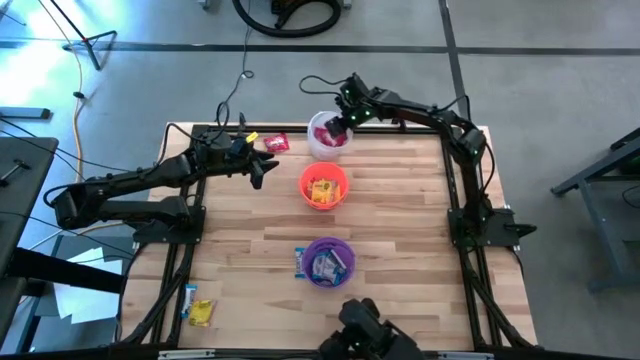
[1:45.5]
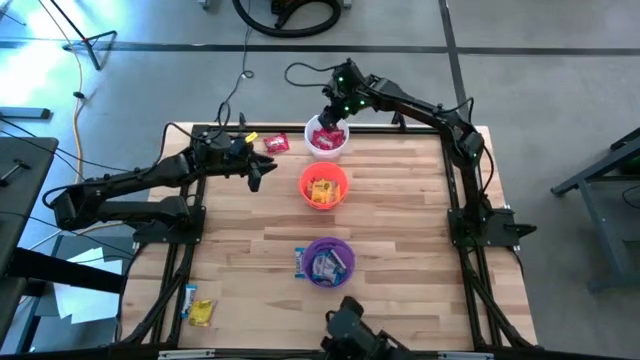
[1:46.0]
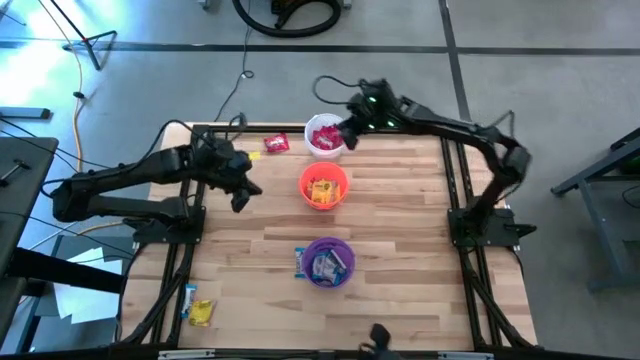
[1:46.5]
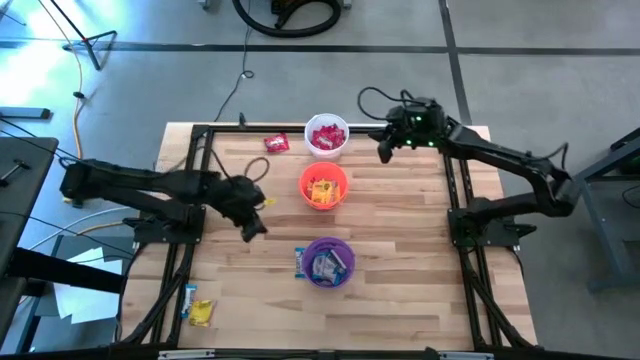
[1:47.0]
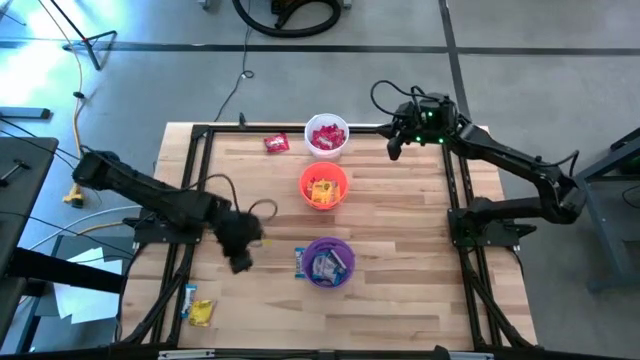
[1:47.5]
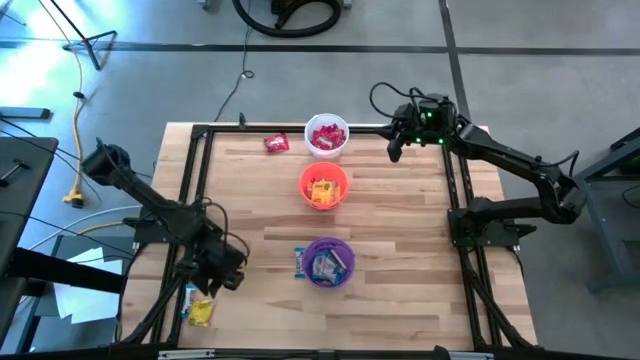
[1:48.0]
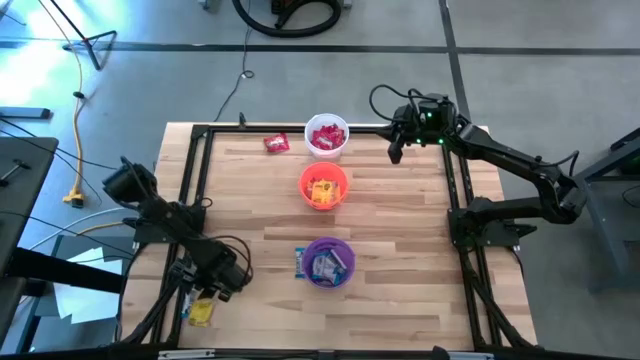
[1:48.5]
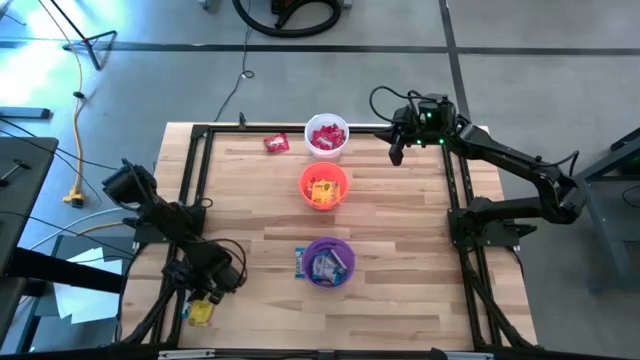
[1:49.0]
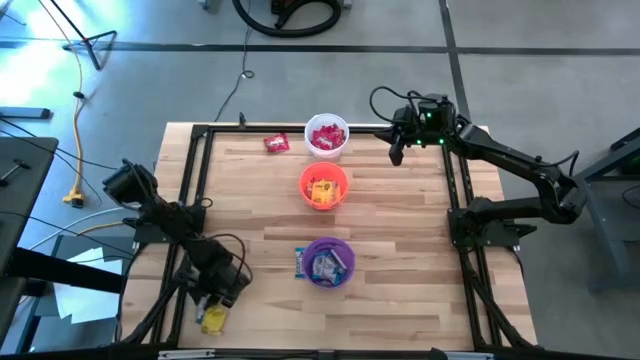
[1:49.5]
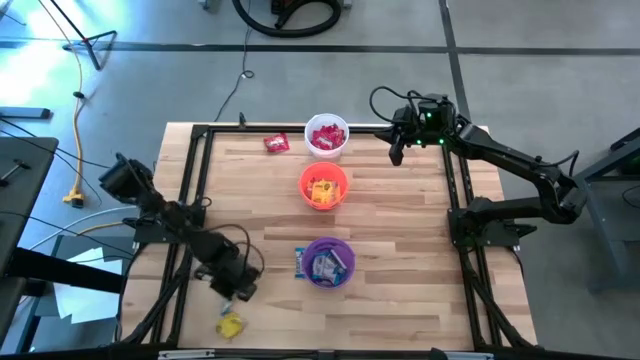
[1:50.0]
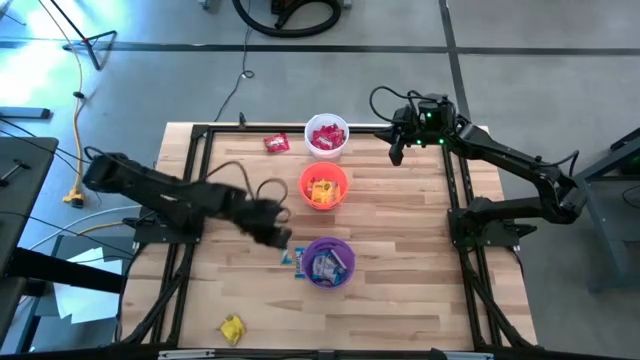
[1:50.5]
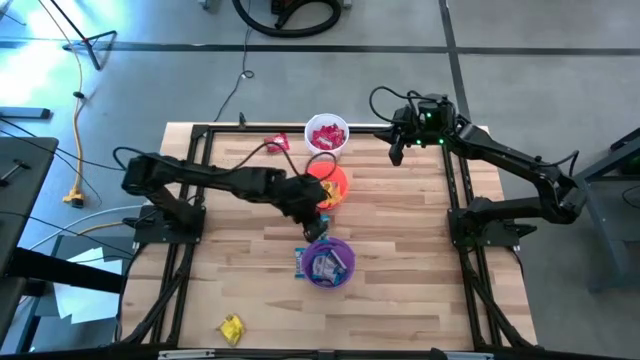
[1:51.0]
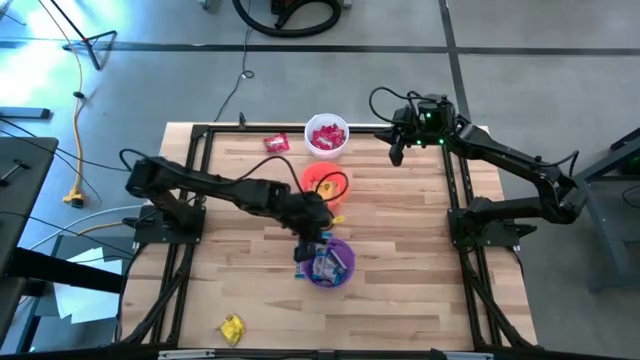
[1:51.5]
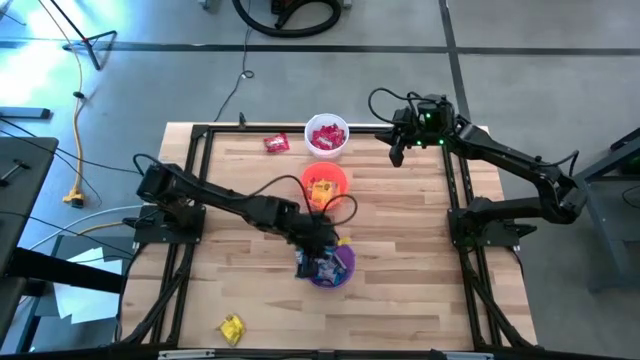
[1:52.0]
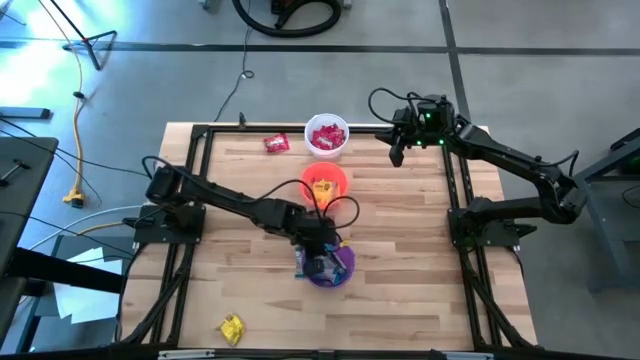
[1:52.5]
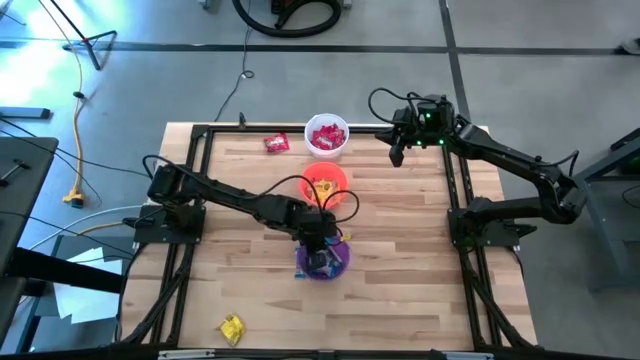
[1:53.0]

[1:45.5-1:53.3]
Task: Sort candy
Put the white chocolate into the violet bucket

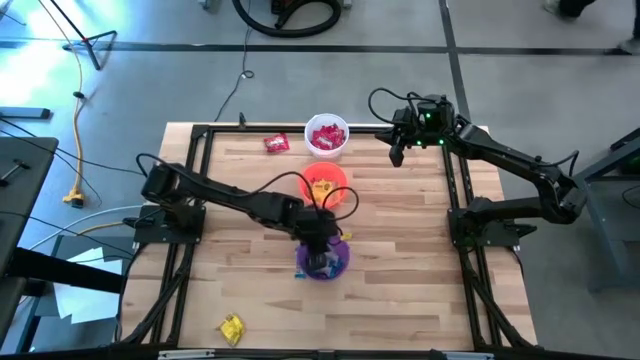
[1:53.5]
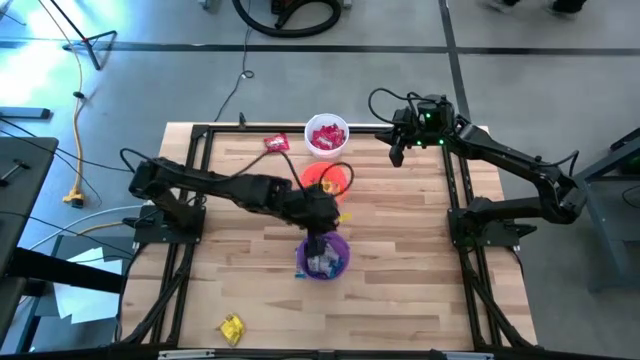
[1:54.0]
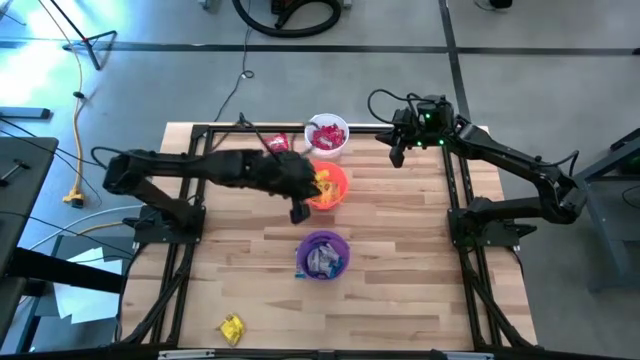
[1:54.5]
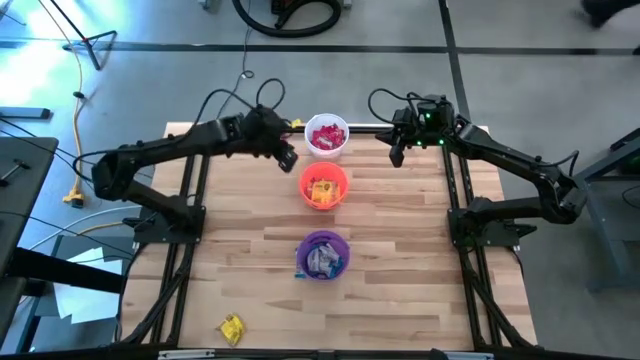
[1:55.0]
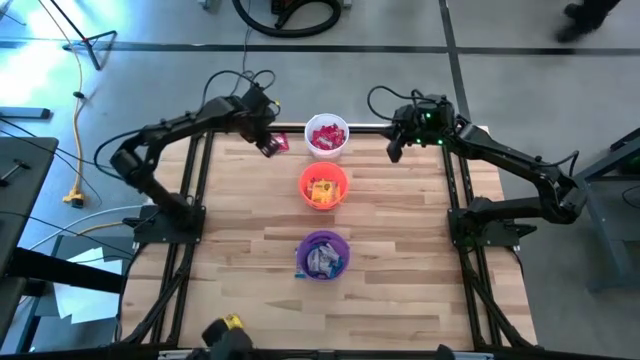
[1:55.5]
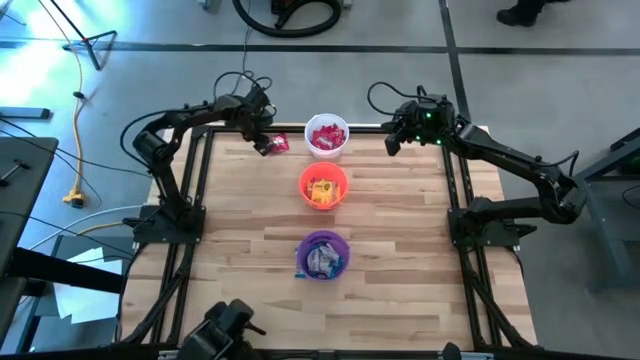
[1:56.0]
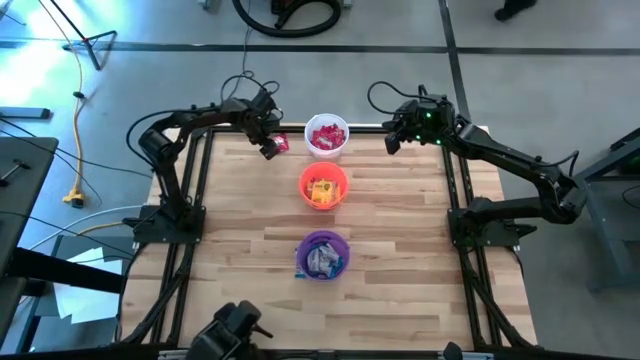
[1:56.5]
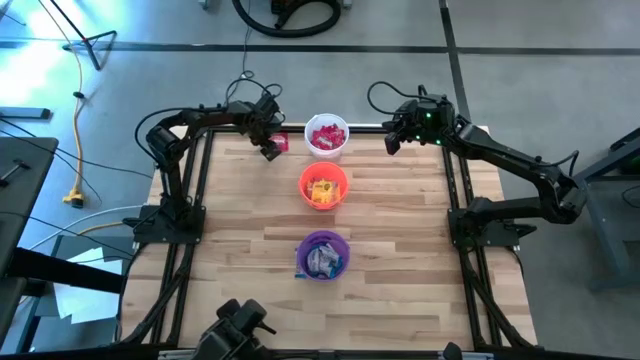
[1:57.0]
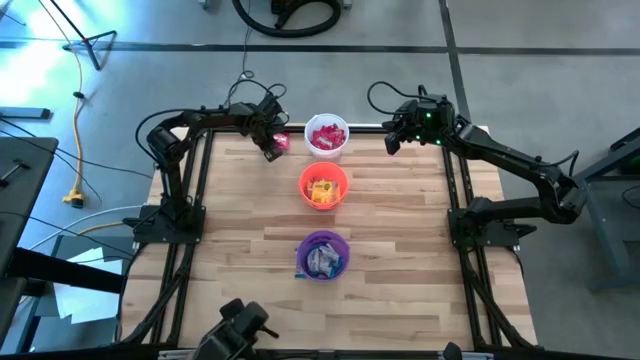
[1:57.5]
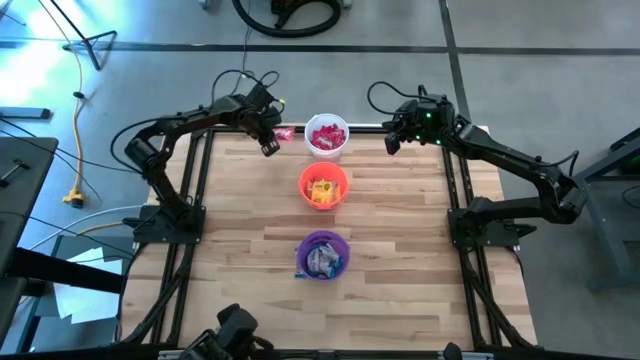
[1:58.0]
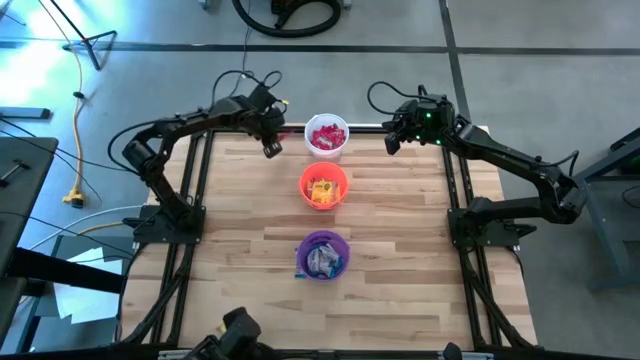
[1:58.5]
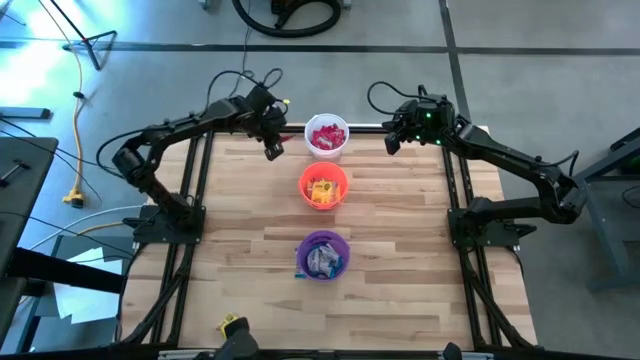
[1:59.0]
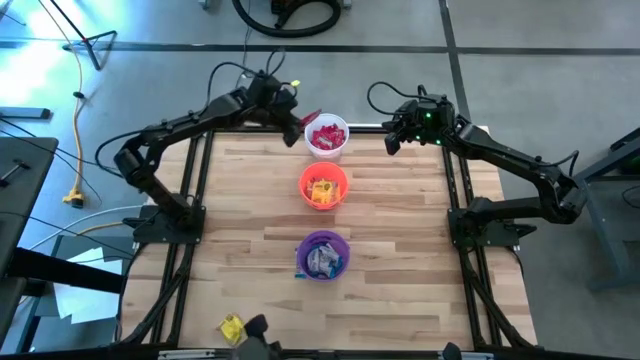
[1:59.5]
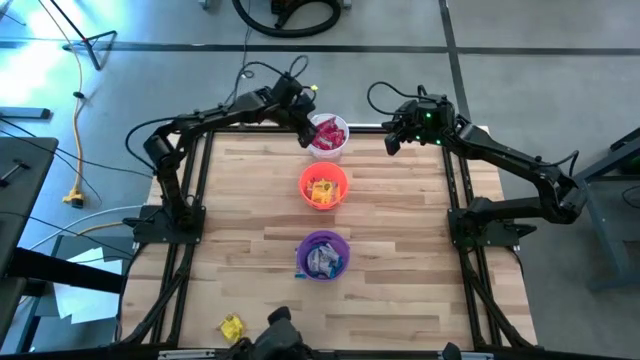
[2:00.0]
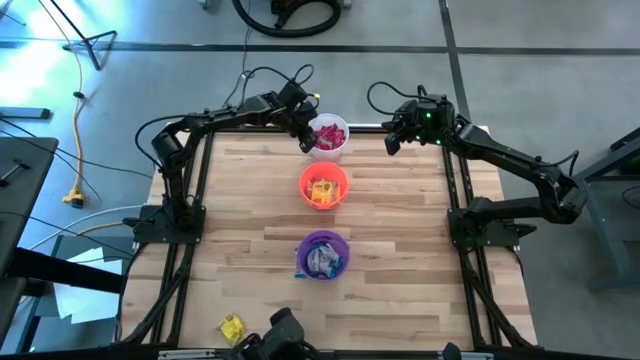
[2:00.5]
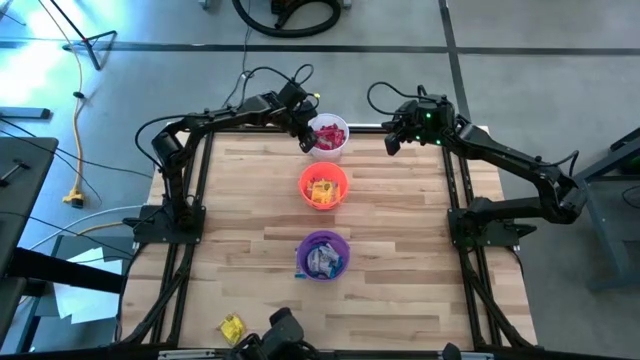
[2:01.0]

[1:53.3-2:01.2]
Put the red candy into the white bucket

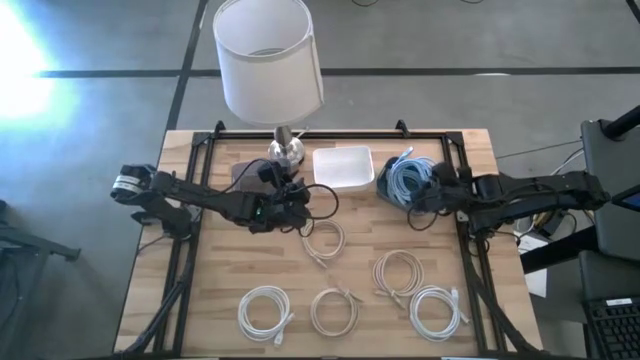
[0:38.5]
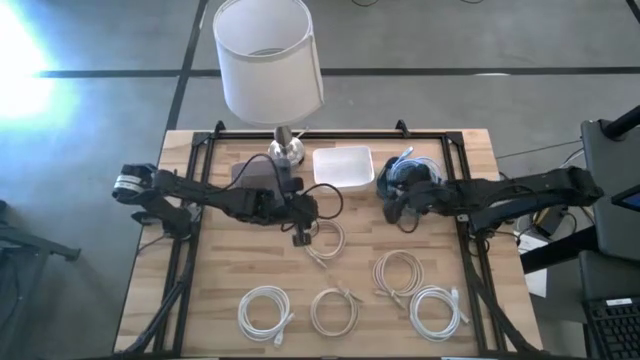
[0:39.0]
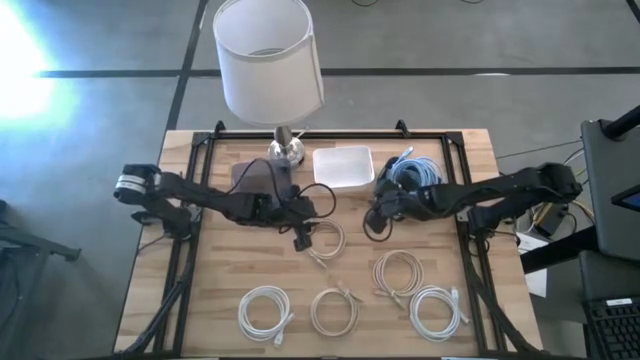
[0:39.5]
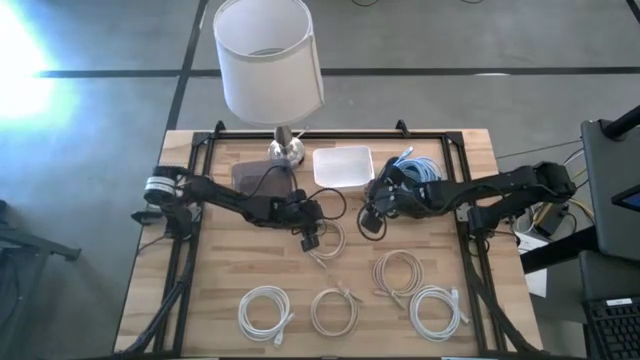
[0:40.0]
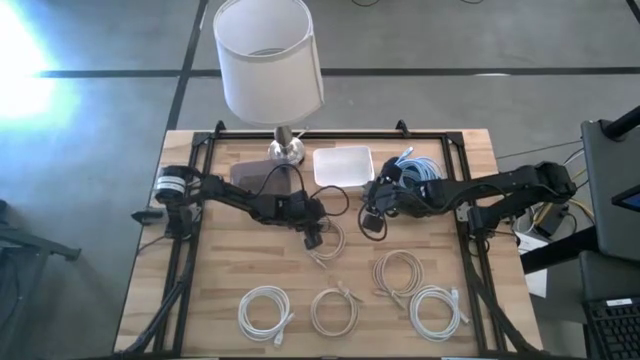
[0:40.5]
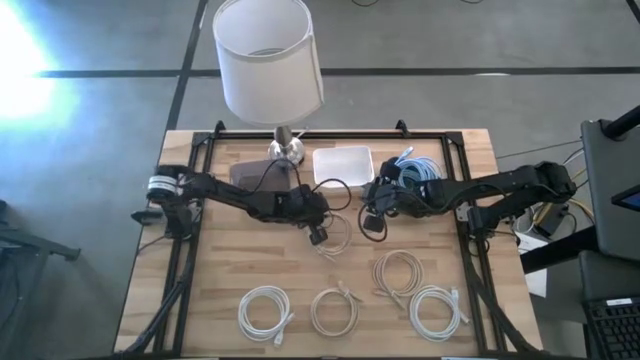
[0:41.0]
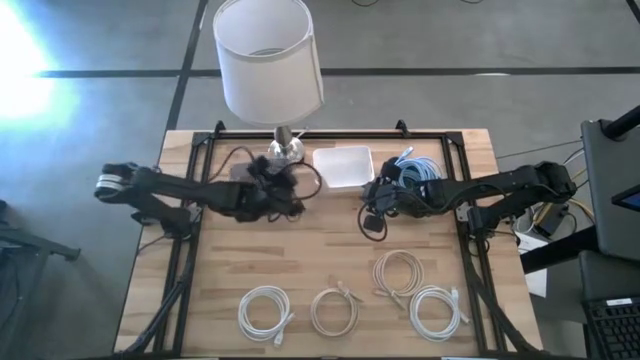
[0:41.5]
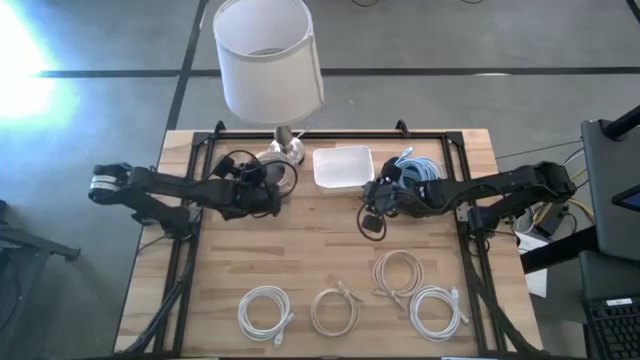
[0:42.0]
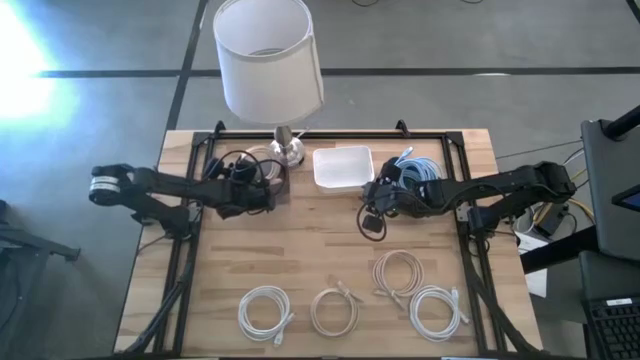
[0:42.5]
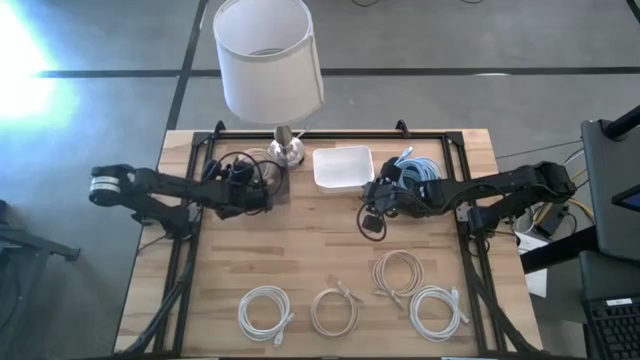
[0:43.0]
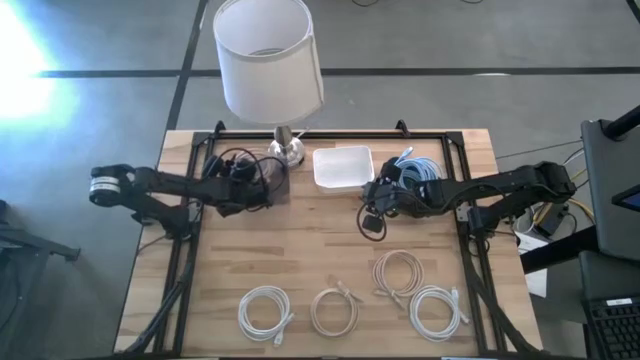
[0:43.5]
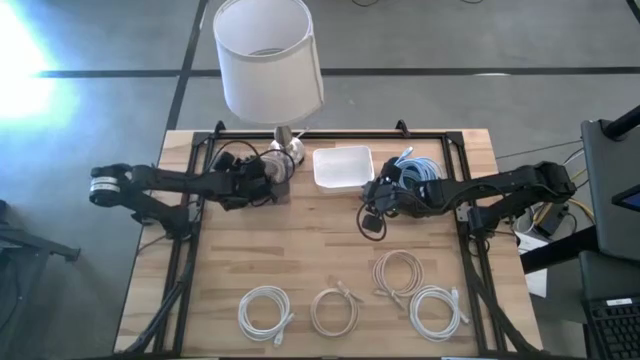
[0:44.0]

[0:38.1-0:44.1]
Task: Sort HDMI cables
Put the top brown hdmi cable into the black bin
